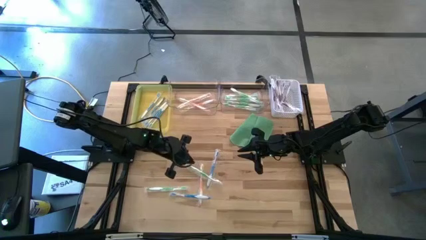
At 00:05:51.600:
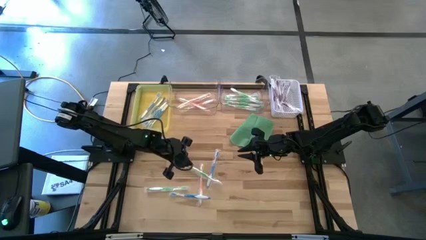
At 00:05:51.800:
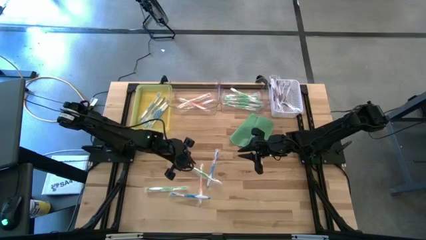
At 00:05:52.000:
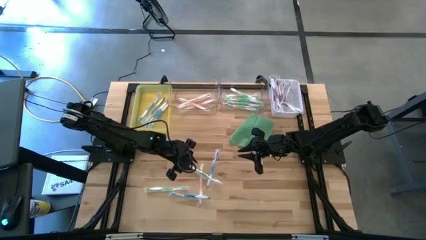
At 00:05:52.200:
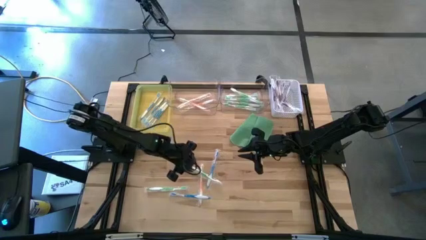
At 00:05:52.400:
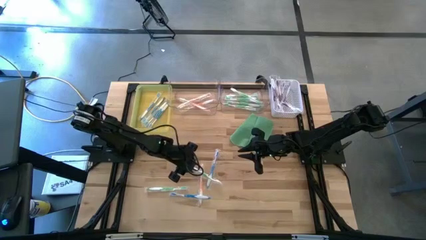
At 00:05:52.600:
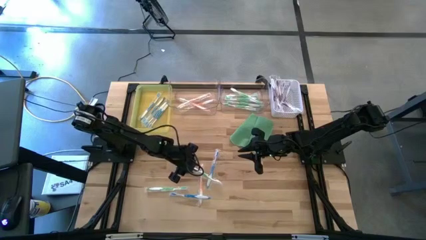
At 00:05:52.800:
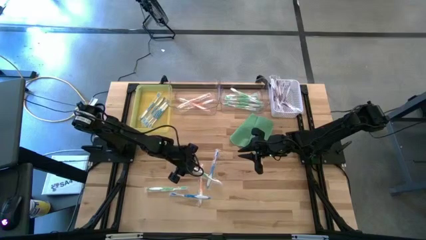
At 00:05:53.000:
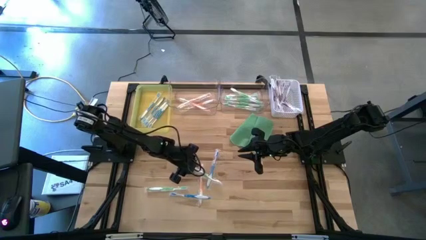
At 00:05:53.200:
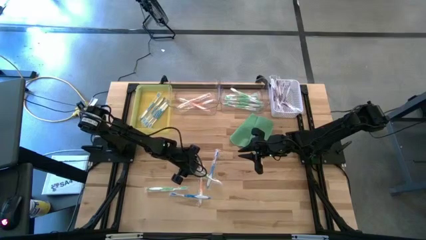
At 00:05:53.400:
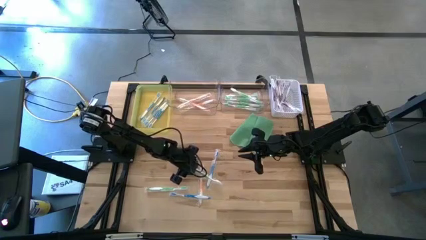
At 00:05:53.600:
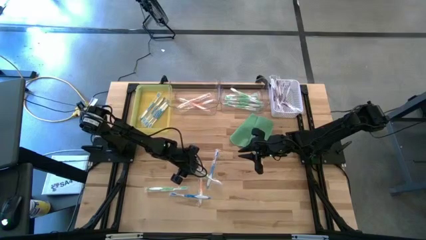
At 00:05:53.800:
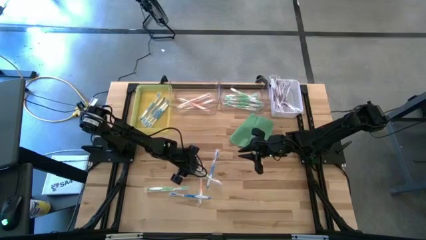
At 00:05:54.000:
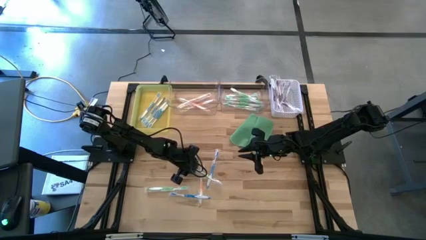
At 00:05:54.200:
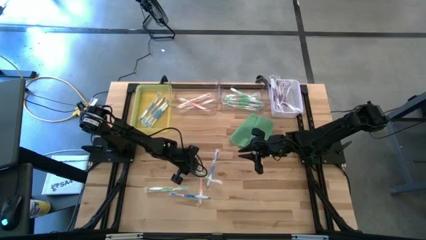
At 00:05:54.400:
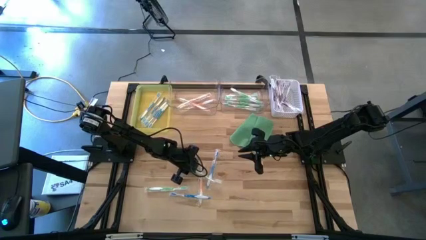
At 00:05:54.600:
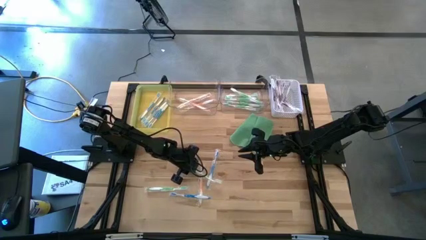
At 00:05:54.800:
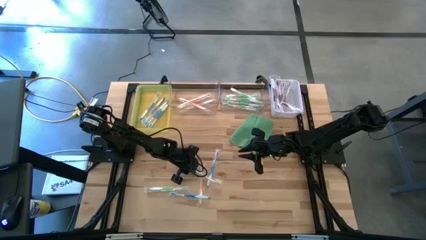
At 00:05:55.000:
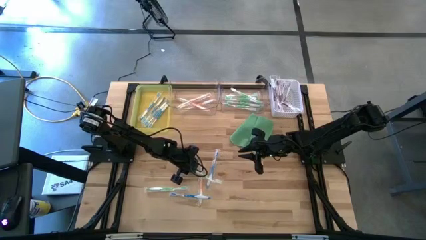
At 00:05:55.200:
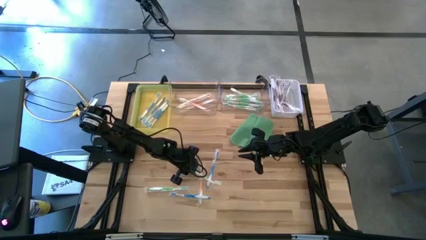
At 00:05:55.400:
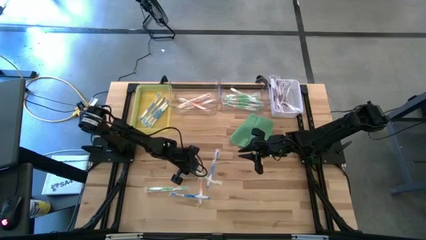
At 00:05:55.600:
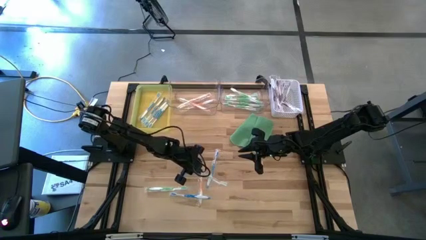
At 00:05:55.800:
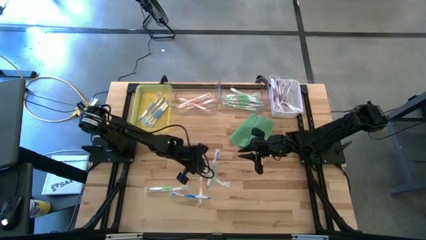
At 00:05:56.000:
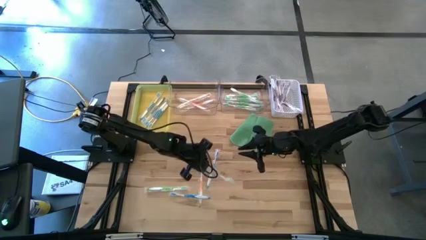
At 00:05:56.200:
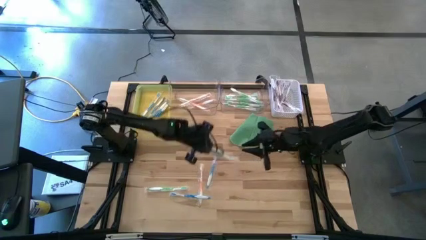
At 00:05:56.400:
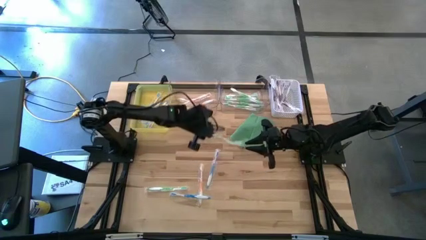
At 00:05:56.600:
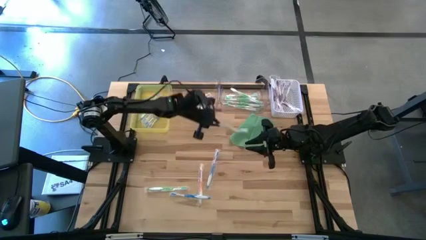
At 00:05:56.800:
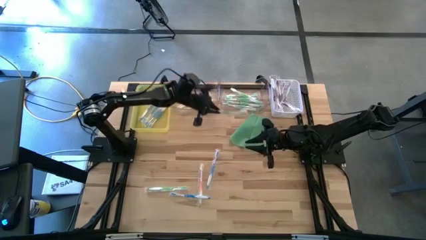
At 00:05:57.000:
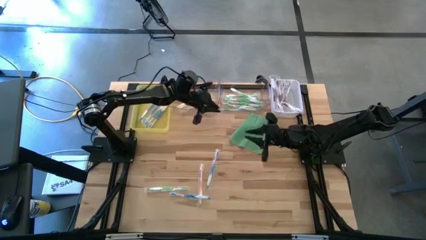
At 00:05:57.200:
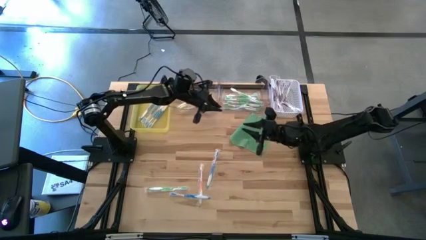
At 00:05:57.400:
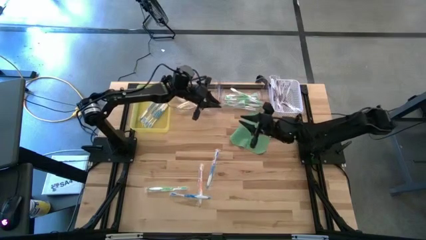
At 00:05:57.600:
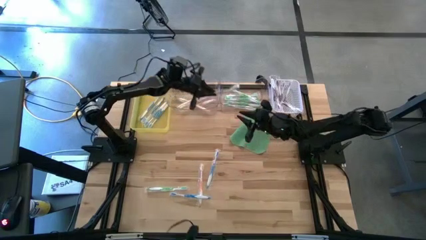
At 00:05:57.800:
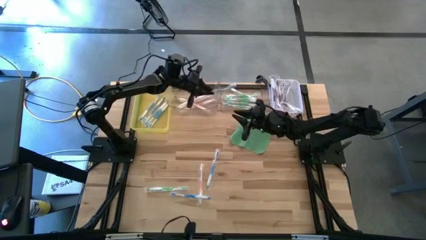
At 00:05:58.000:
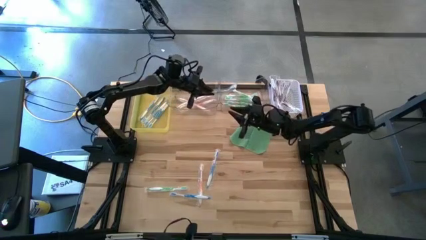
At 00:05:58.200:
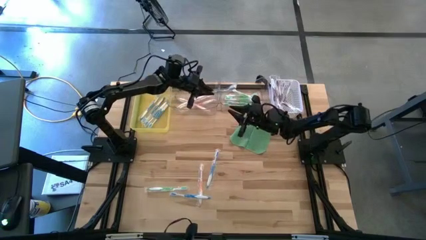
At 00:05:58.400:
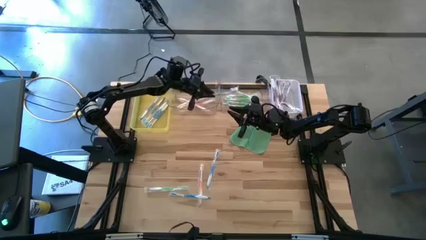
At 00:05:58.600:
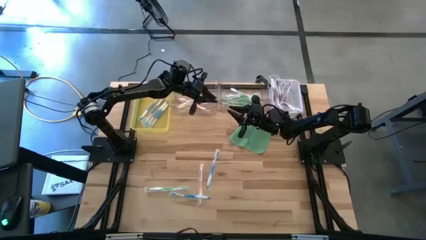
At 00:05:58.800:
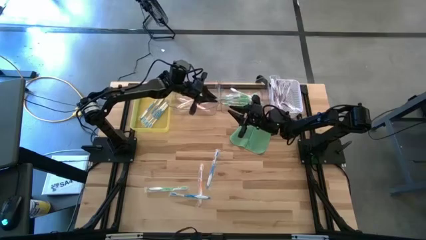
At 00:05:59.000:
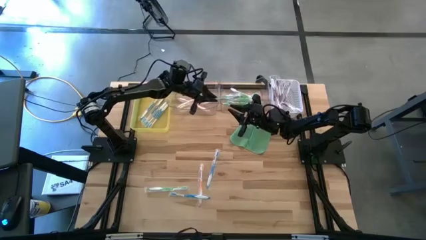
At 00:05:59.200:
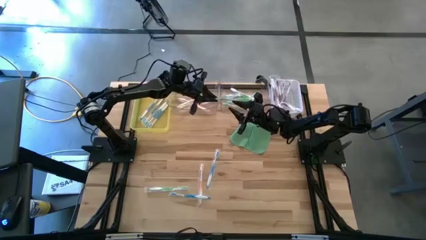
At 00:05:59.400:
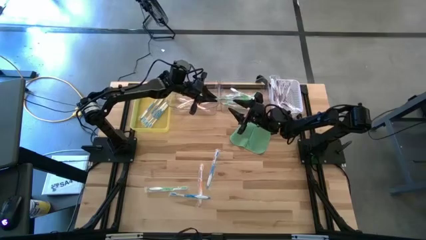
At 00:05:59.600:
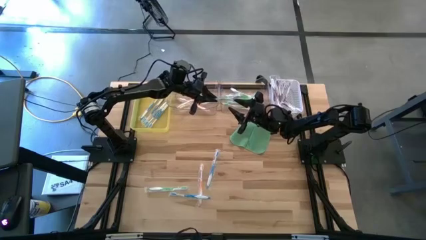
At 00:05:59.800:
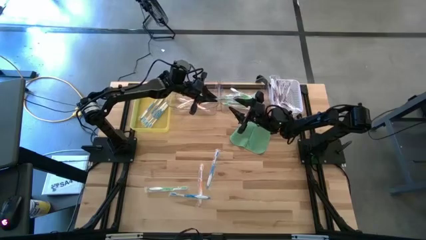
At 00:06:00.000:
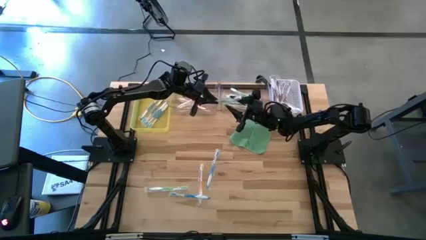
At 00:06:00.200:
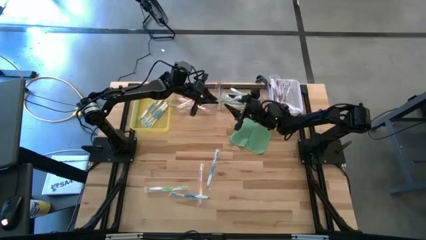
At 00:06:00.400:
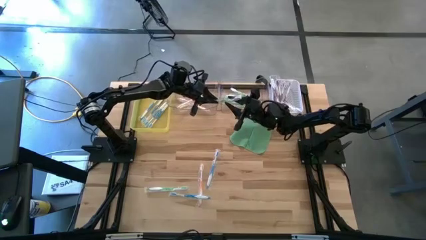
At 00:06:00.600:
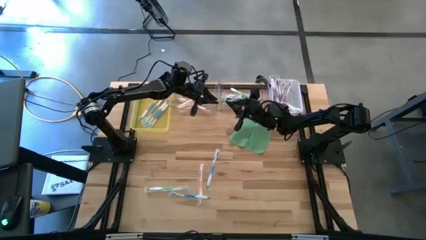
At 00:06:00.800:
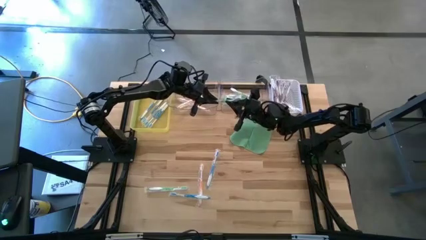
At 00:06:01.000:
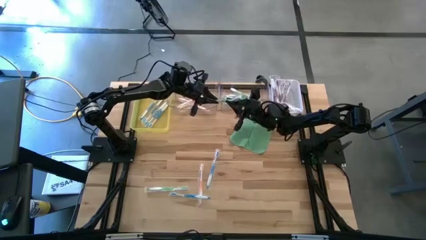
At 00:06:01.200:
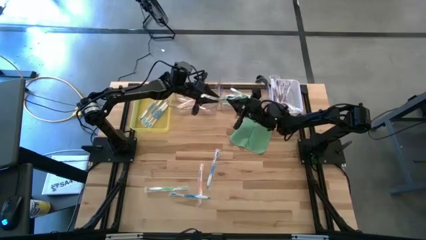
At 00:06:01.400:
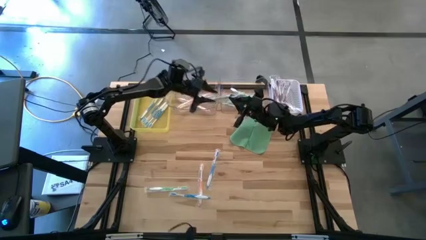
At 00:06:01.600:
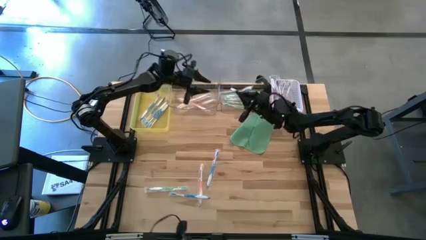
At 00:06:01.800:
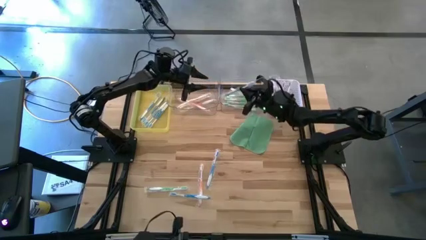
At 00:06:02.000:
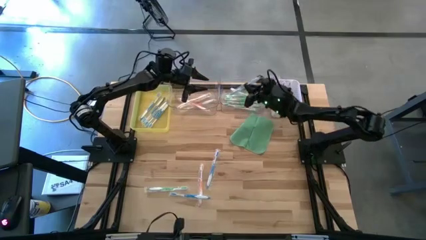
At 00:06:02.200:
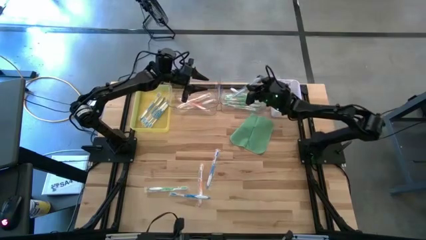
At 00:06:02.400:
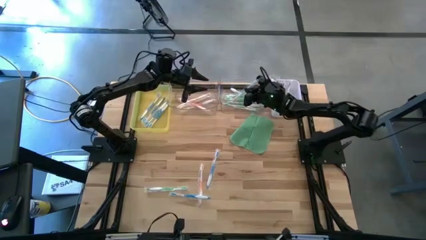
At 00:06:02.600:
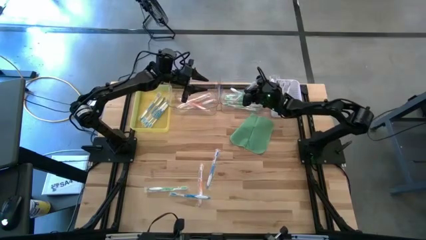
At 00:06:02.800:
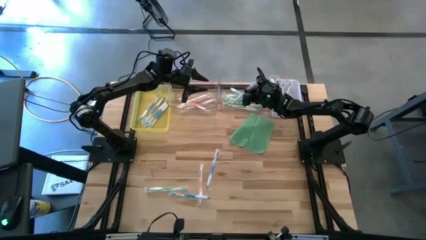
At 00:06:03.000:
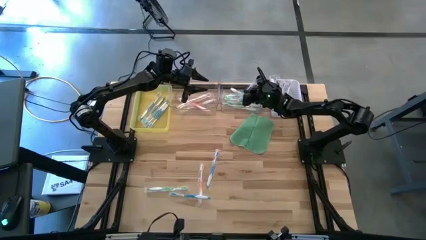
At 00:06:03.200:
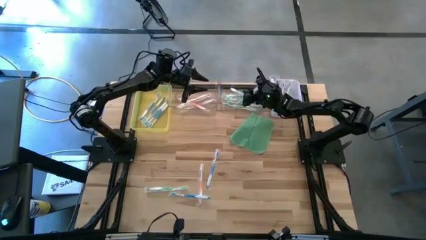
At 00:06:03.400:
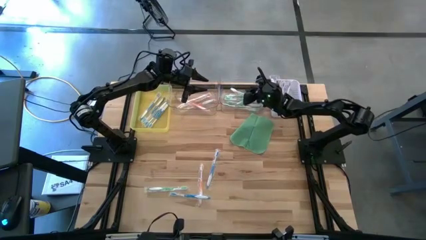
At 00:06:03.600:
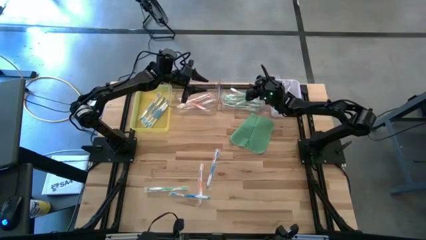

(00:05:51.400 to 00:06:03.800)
Task: Pick & Place Toothbrushes
Put the green toothbrush into the right transparent bin

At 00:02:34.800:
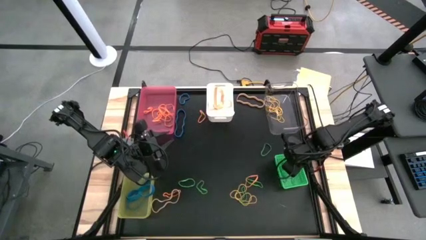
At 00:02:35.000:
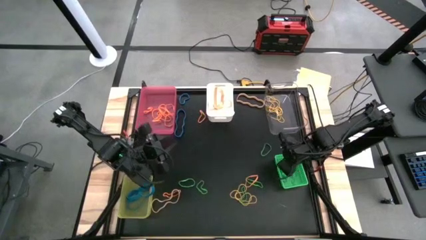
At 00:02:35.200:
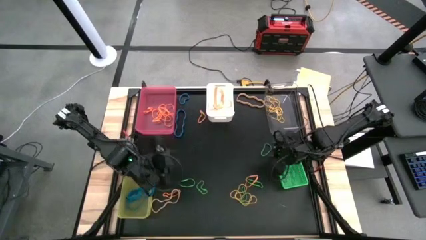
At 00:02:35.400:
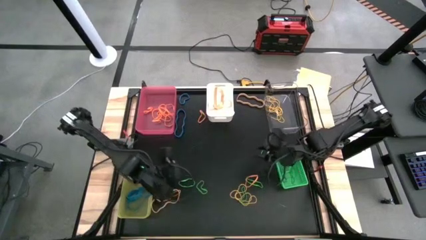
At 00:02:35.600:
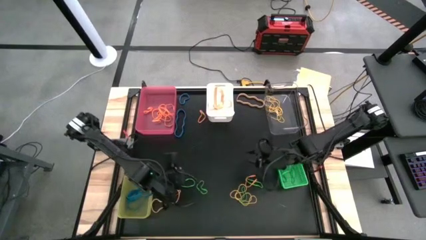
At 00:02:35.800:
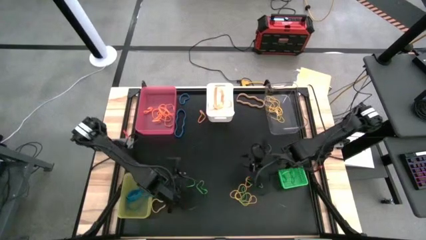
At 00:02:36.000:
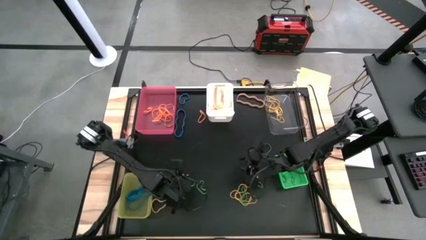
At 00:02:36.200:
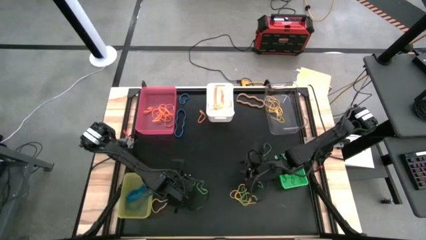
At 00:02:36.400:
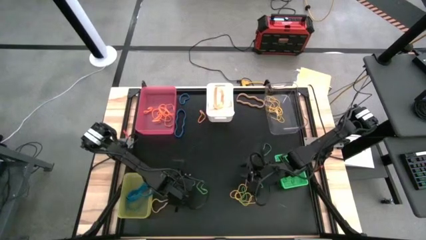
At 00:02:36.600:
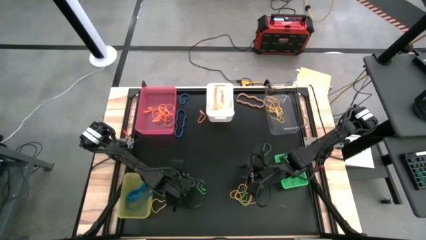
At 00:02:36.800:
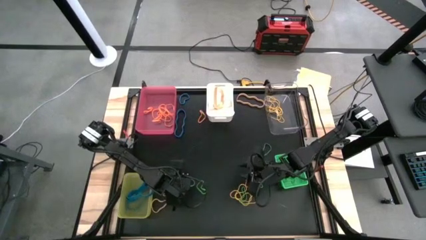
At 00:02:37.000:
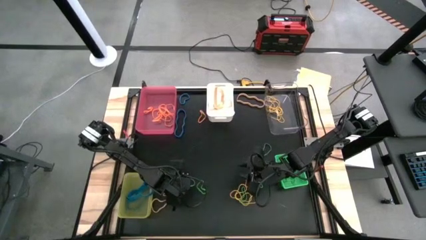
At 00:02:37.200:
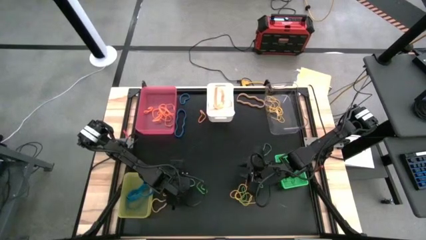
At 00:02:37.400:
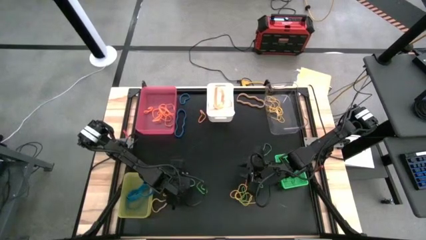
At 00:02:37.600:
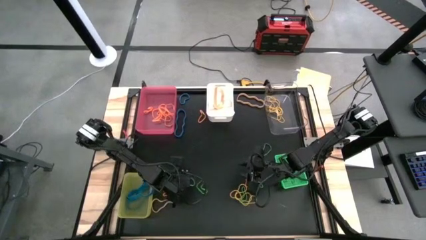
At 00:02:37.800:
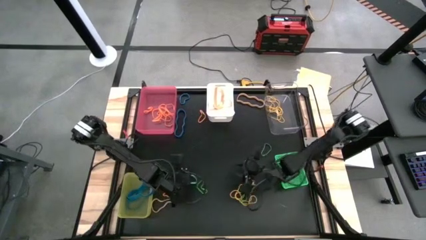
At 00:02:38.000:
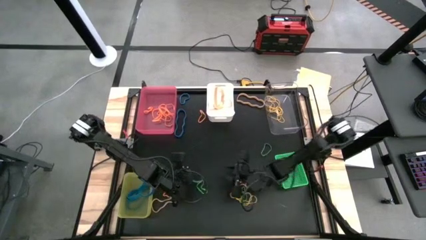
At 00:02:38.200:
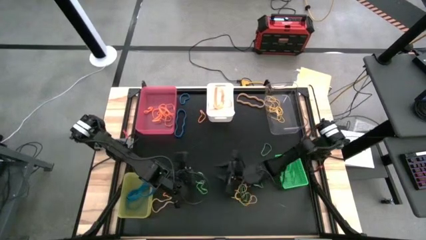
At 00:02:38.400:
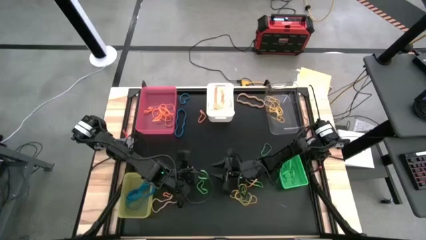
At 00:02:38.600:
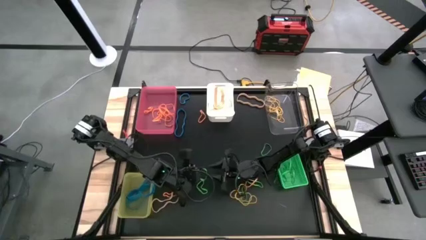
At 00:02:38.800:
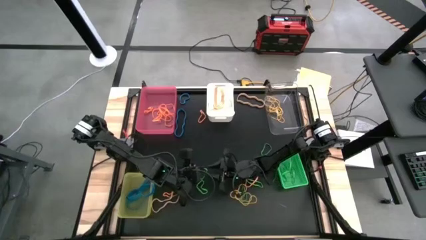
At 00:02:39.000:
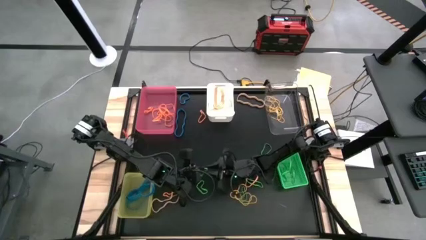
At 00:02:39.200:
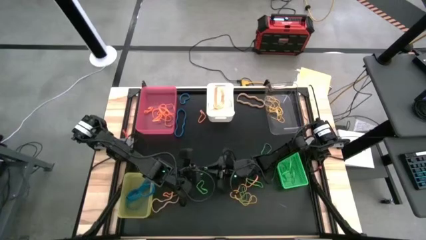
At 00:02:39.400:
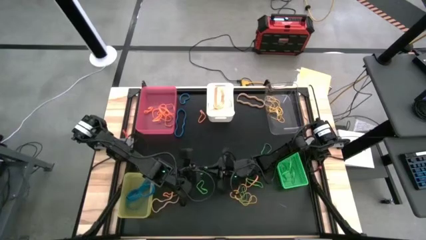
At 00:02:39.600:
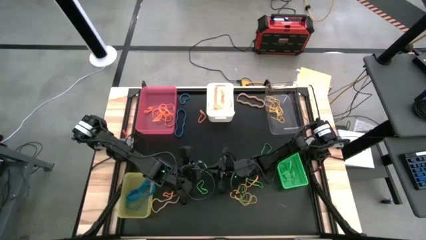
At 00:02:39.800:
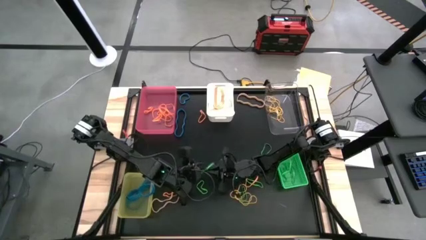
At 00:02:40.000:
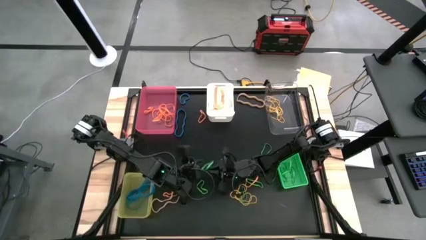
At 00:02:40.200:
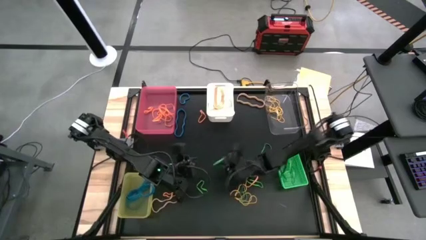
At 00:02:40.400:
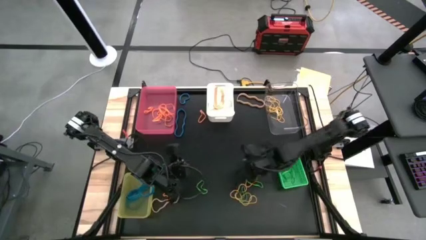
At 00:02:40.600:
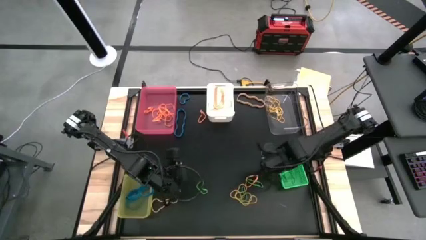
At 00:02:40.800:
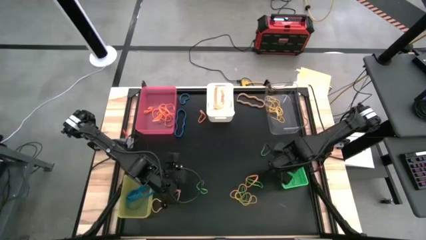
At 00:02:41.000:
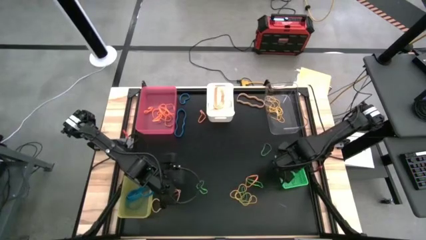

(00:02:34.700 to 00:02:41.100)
Task: Sort rubber bands into baskets
Put the green rubber band into the green bin
